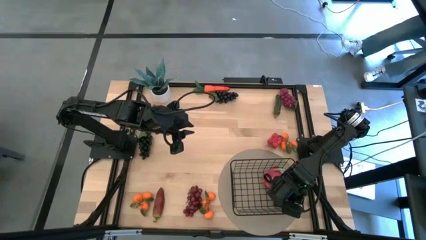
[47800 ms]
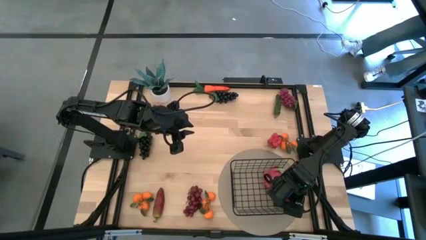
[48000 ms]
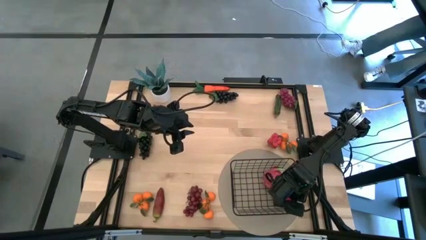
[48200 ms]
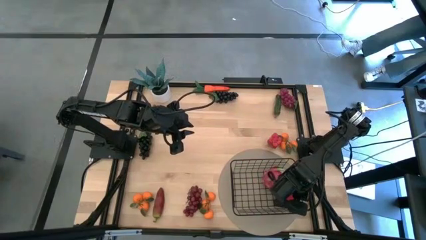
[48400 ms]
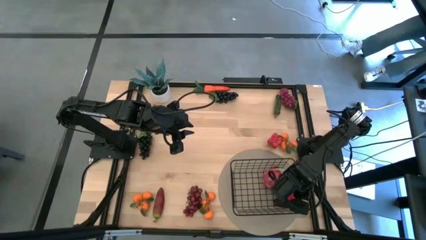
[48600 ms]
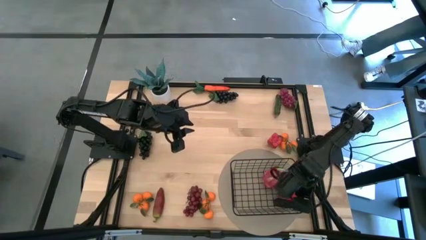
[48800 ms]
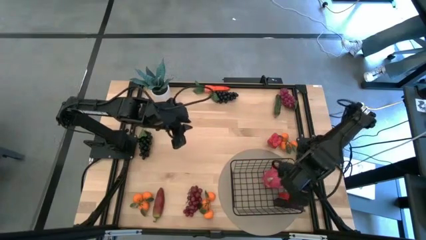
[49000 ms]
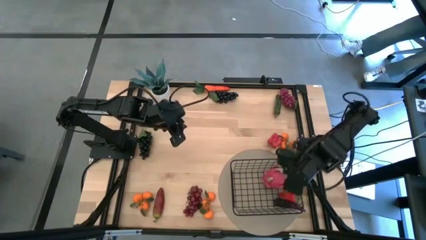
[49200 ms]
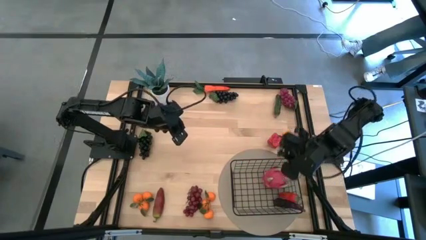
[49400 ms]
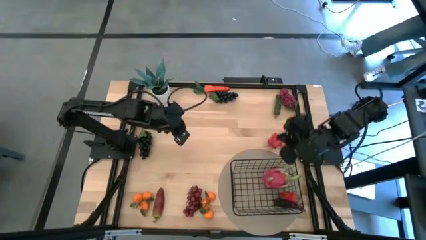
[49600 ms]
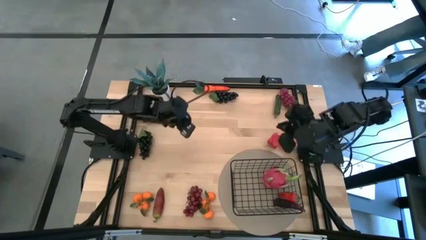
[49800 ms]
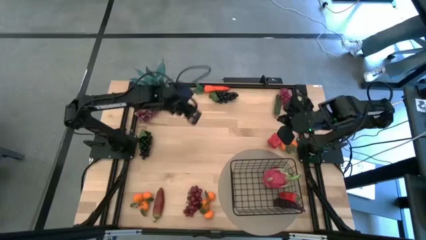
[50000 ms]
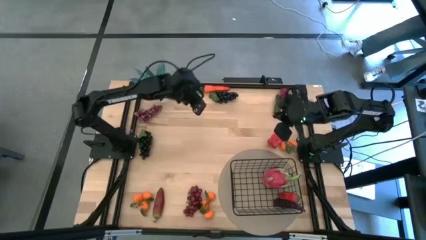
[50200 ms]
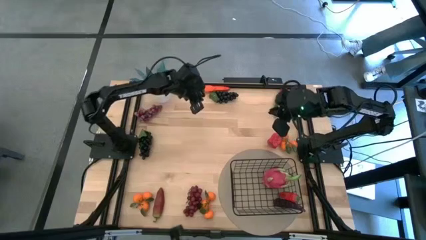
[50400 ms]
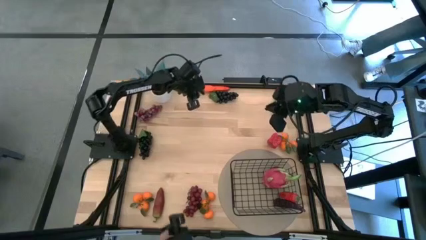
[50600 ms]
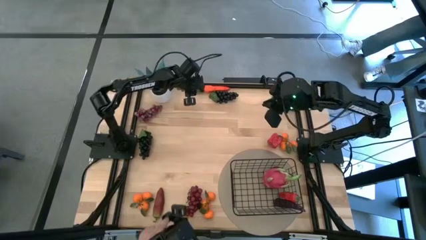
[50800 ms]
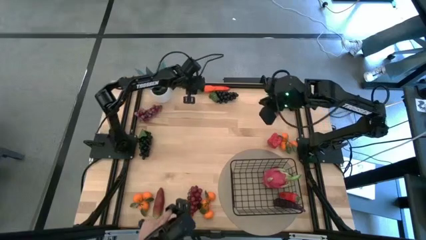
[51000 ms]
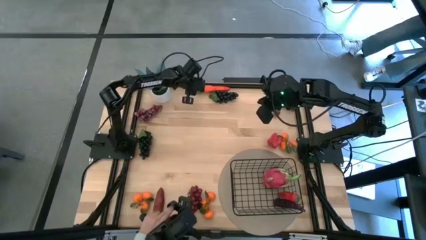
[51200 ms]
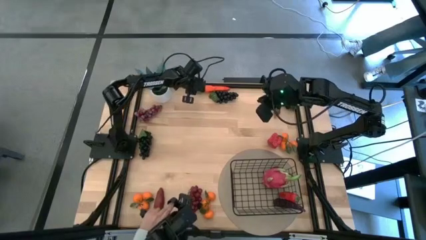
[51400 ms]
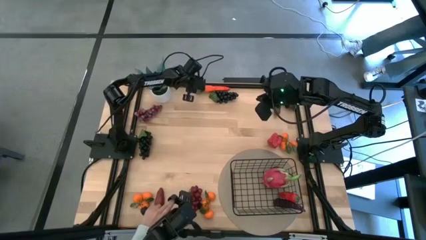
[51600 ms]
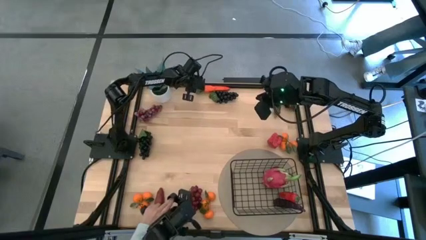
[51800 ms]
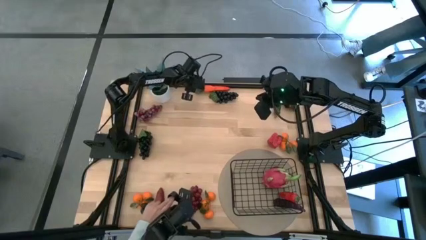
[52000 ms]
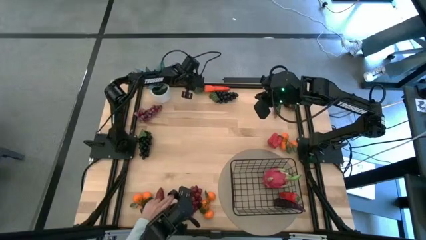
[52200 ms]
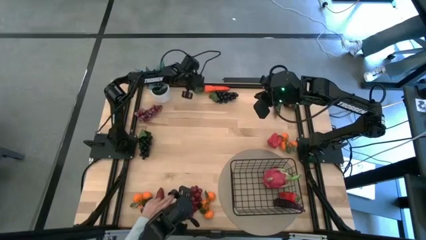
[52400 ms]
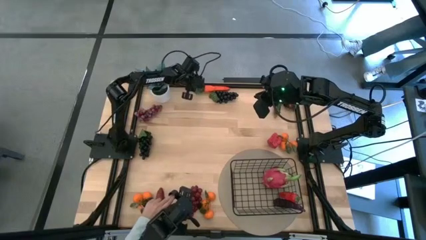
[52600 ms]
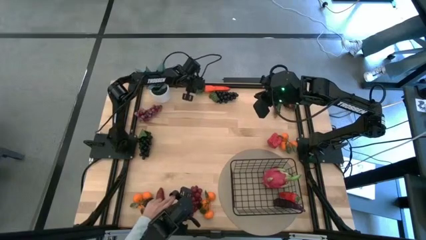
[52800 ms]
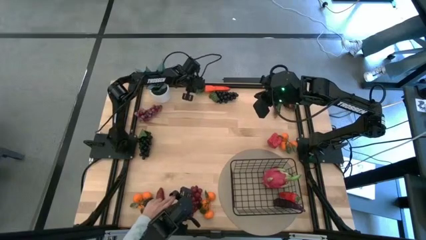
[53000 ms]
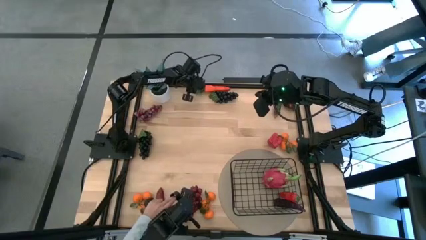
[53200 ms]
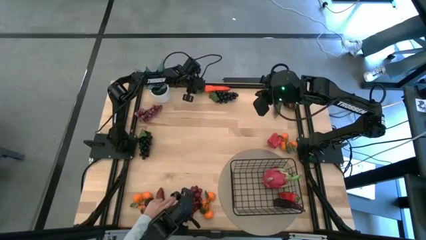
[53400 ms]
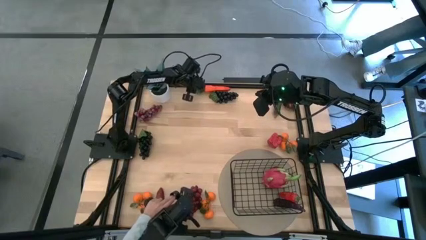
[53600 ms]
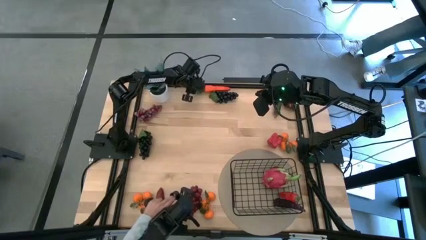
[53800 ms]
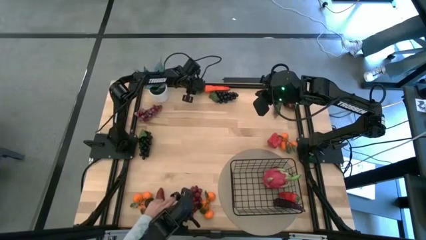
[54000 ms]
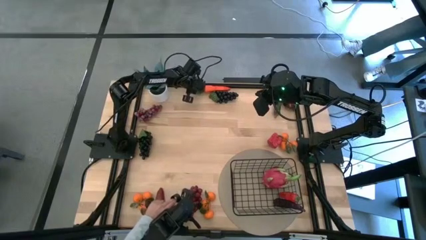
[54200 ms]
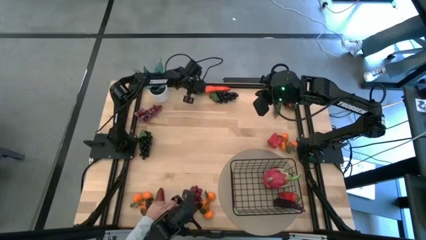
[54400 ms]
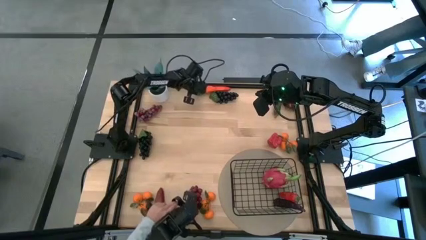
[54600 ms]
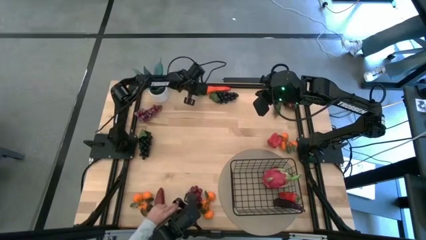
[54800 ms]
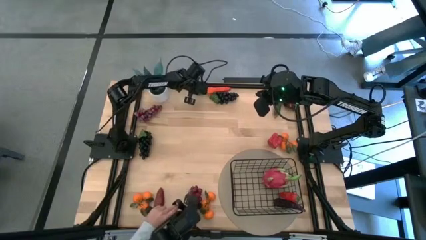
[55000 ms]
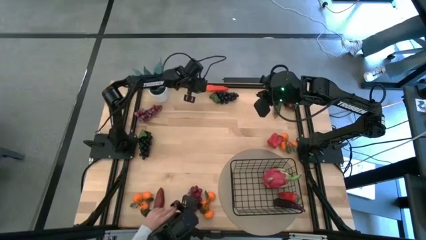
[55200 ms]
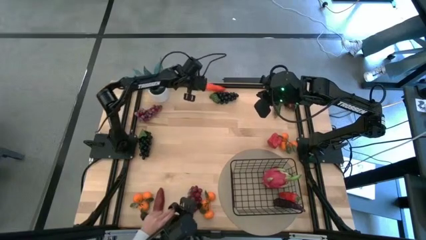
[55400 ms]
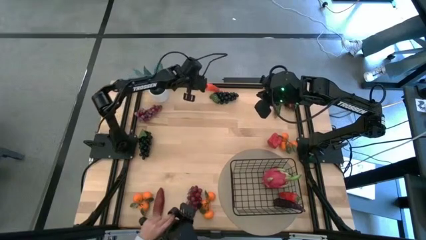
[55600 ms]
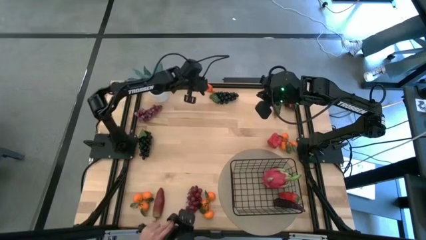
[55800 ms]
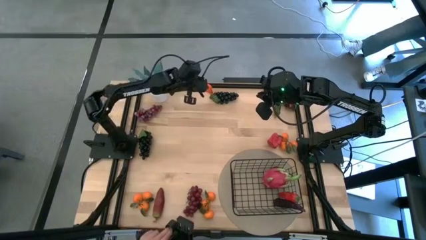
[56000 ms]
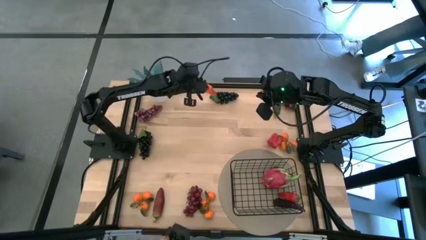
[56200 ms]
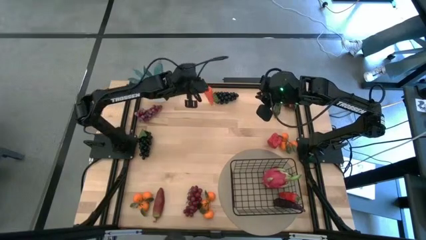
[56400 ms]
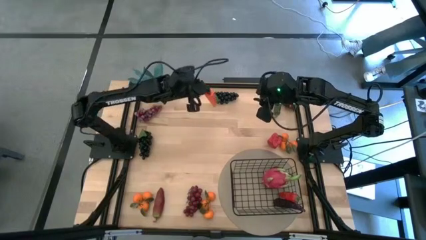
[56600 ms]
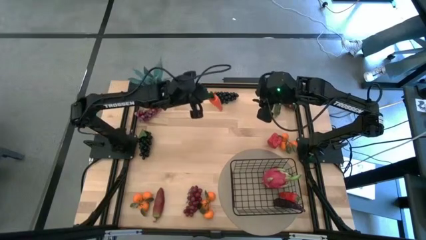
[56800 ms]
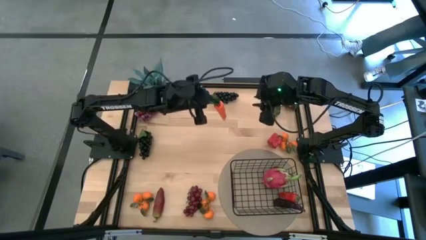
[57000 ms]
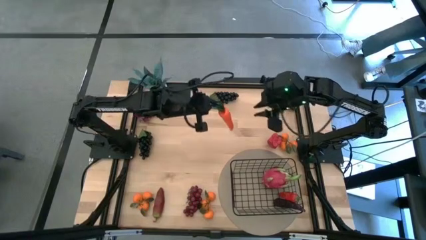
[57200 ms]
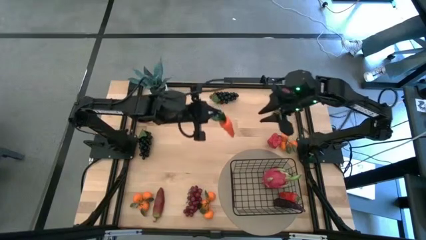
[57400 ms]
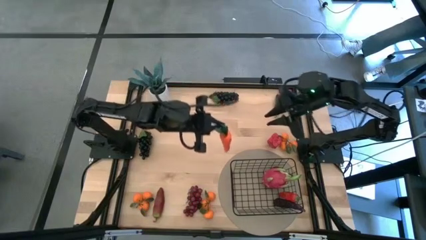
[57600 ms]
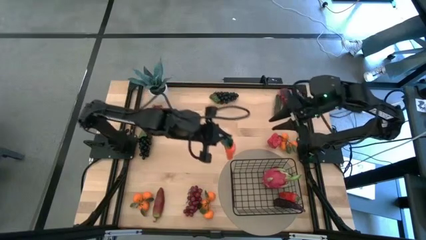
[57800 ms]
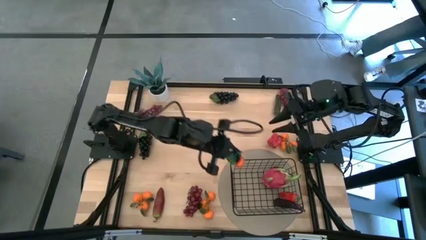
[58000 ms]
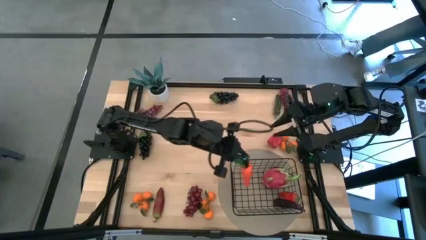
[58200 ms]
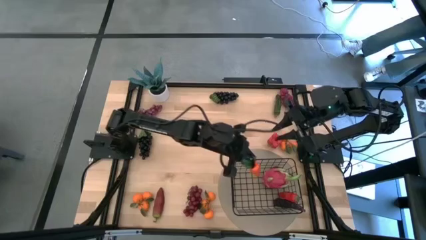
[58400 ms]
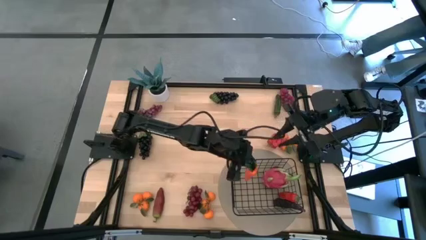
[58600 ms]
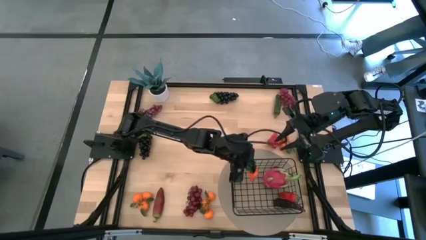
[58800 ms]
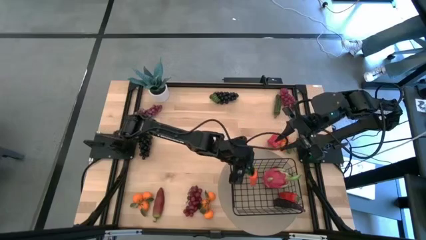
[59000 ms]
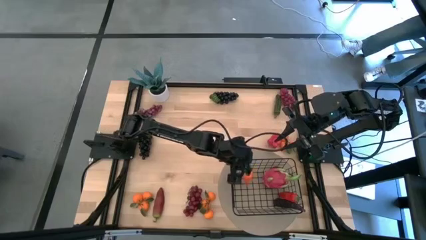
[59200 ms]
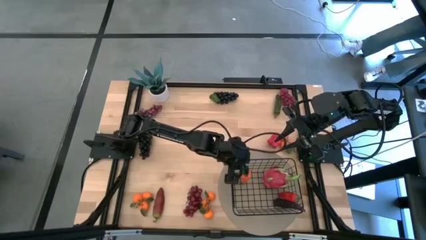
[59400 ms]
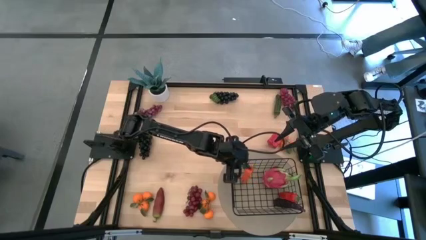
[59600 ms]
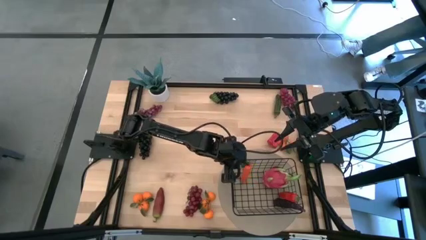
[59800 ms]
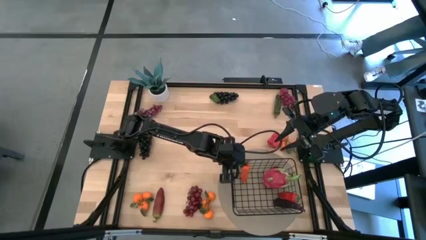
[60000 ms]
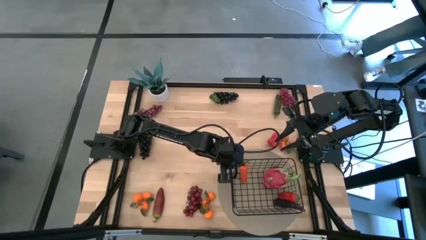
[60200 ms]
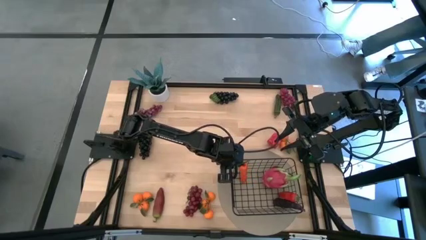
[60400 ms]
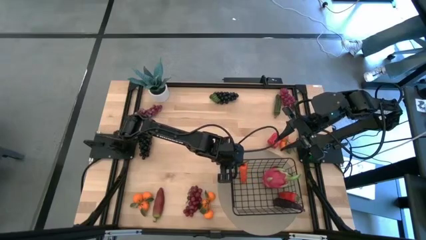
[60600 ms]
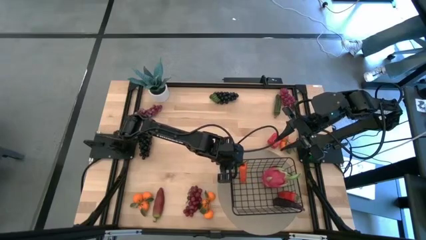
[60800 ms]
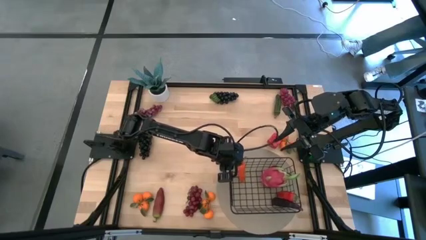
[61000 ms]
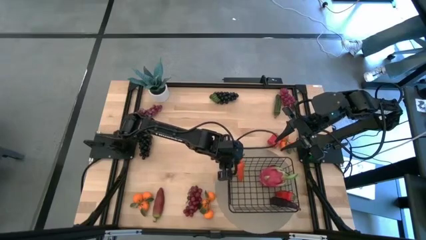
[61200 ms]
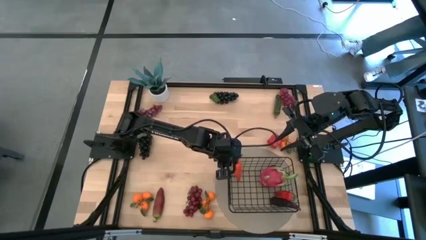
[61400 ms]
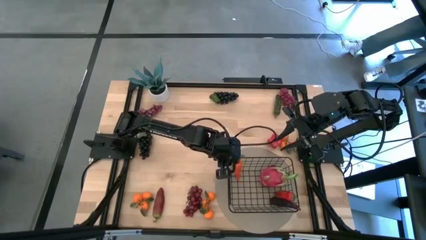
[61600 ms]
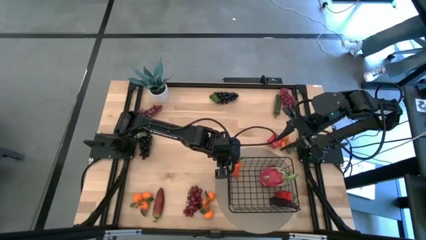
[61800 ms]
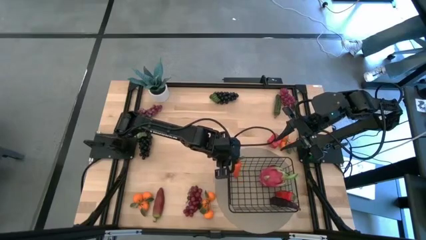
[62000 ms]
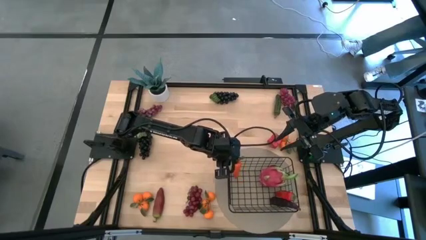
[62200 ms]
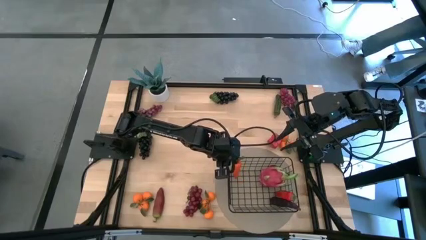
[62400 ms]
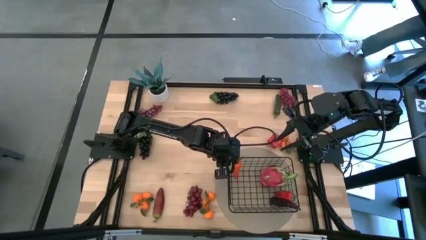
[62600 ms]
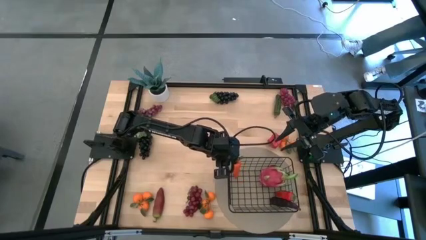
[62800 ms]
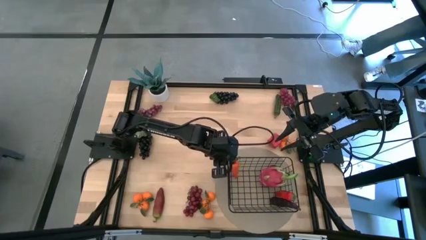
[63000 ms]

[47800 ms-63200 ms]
Task: Build produce basket
Put the carrot into the wire basket
